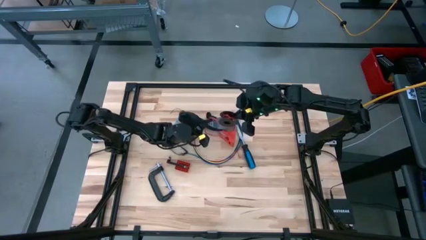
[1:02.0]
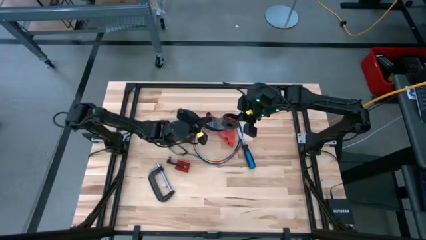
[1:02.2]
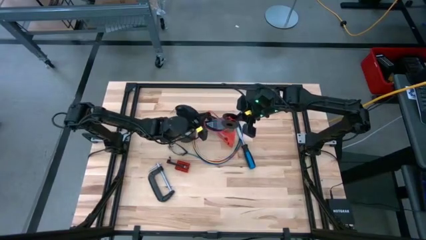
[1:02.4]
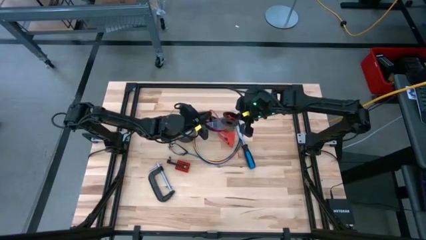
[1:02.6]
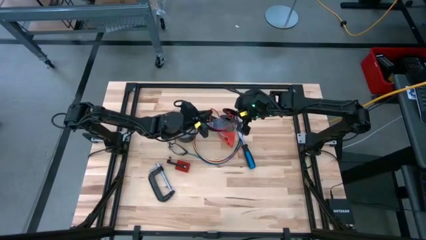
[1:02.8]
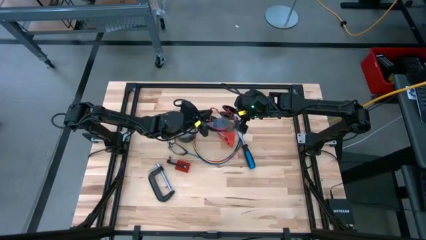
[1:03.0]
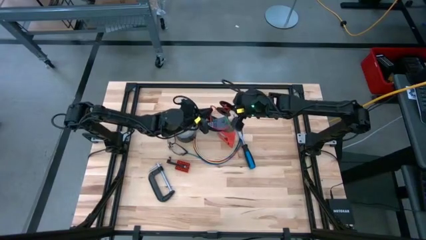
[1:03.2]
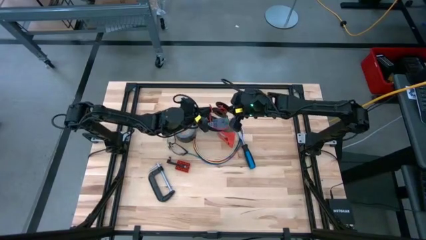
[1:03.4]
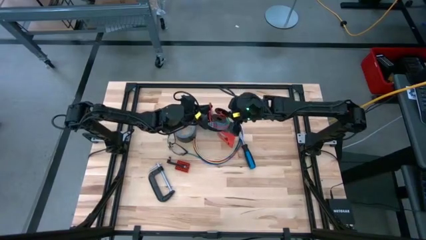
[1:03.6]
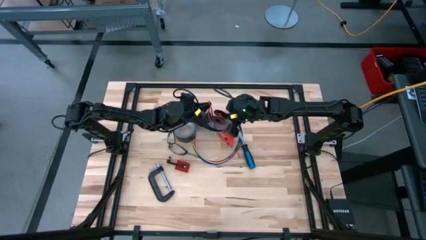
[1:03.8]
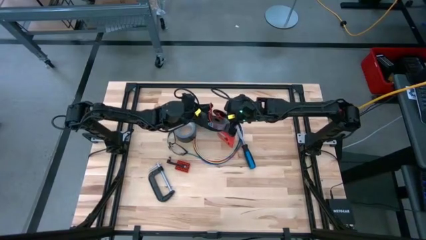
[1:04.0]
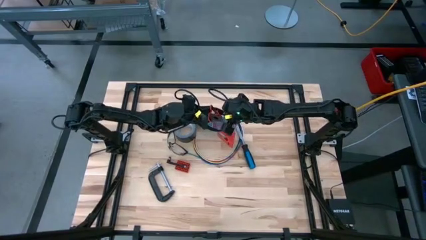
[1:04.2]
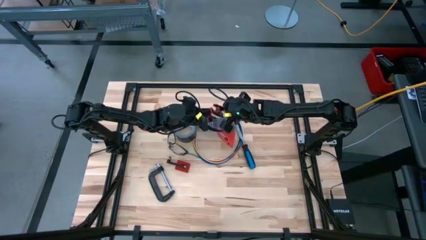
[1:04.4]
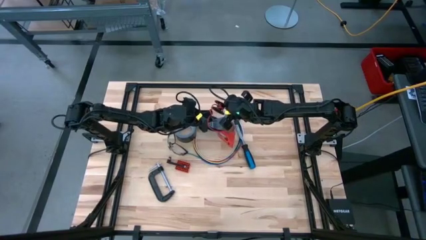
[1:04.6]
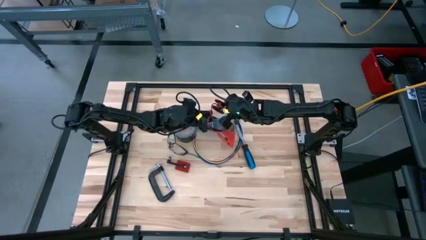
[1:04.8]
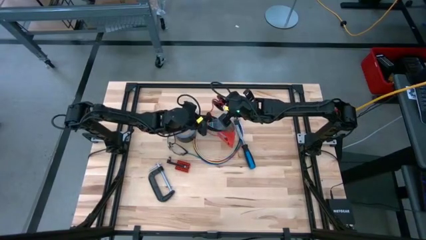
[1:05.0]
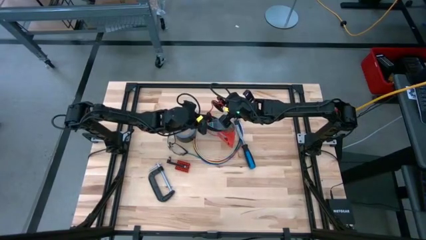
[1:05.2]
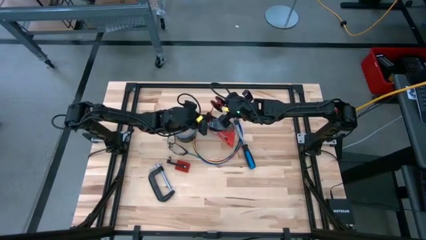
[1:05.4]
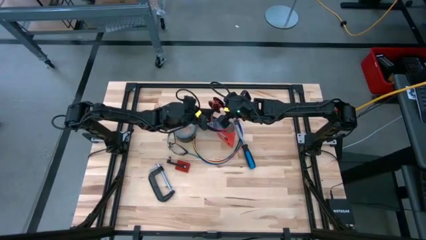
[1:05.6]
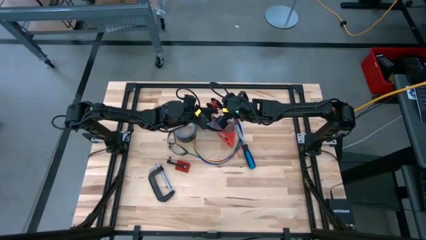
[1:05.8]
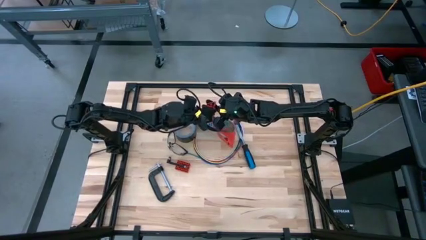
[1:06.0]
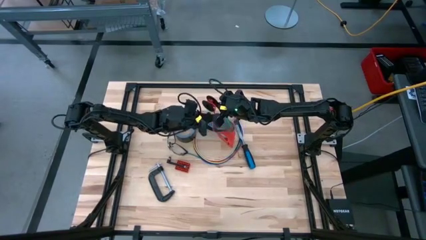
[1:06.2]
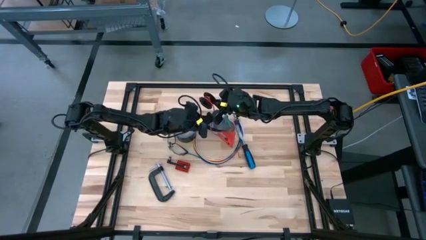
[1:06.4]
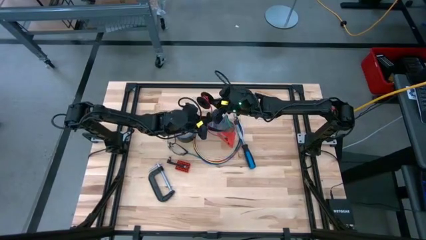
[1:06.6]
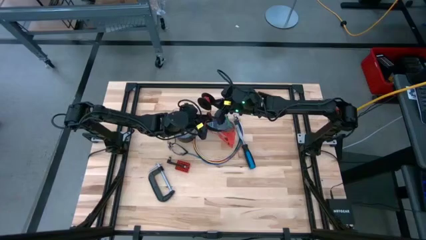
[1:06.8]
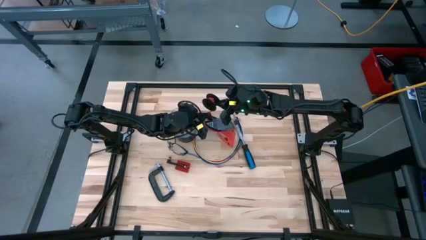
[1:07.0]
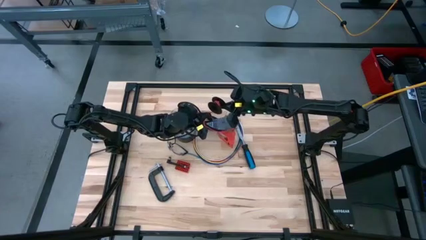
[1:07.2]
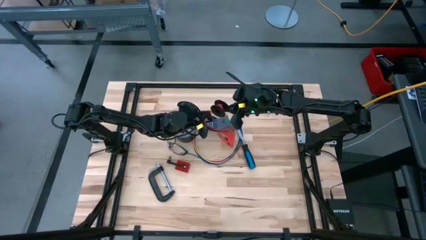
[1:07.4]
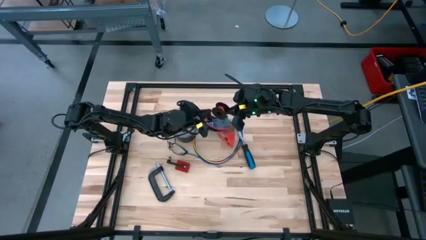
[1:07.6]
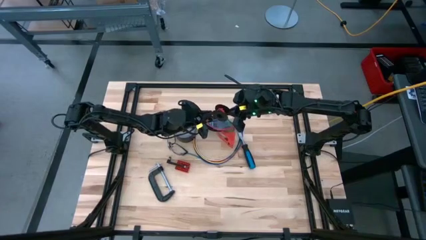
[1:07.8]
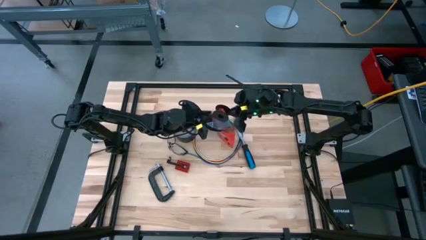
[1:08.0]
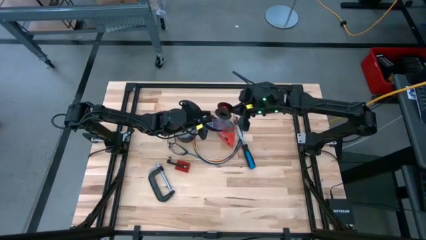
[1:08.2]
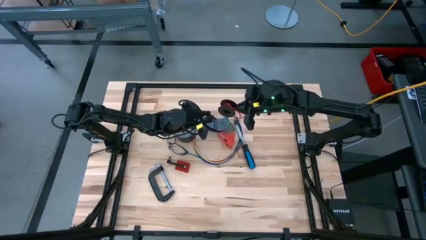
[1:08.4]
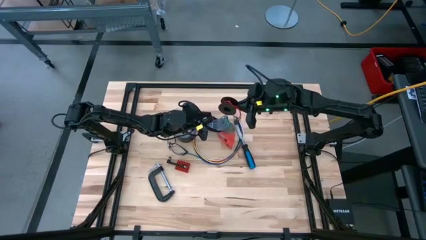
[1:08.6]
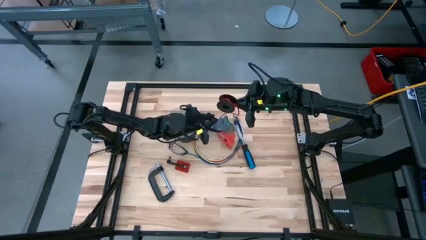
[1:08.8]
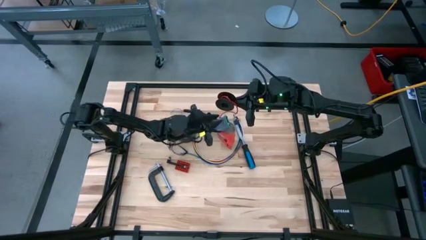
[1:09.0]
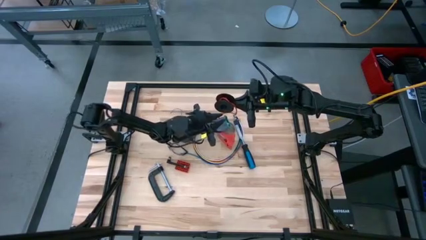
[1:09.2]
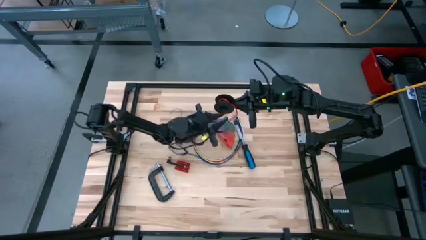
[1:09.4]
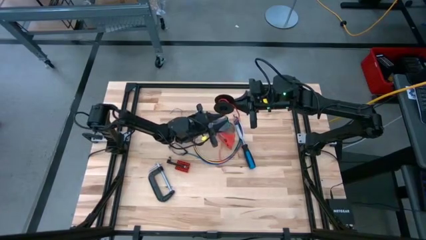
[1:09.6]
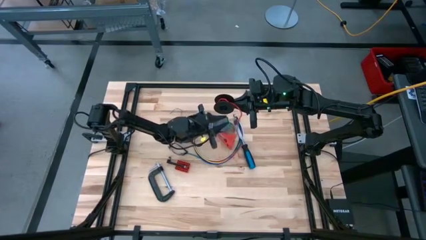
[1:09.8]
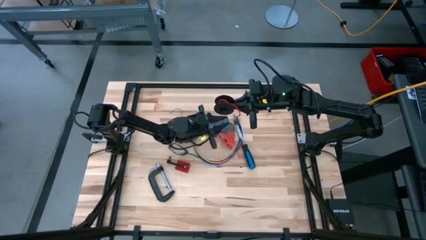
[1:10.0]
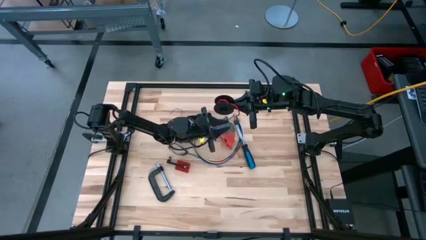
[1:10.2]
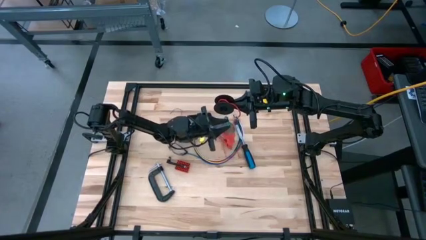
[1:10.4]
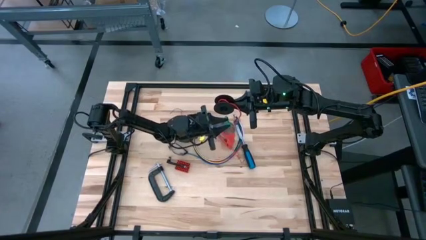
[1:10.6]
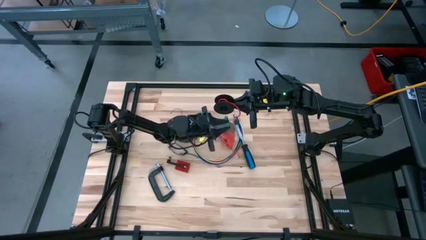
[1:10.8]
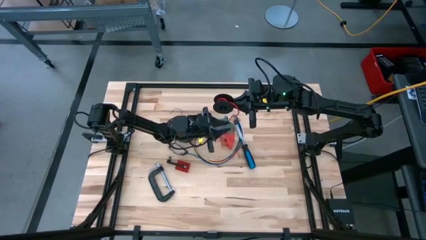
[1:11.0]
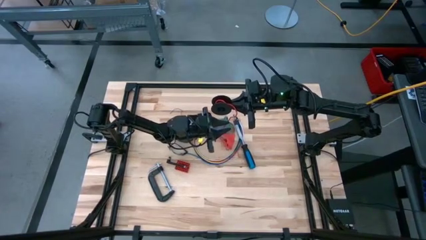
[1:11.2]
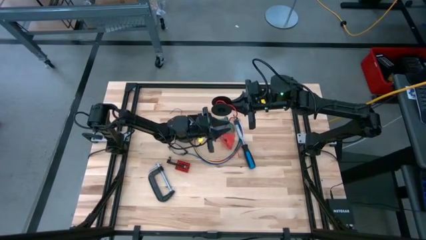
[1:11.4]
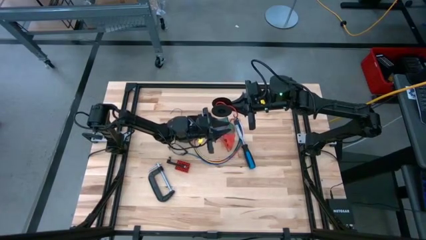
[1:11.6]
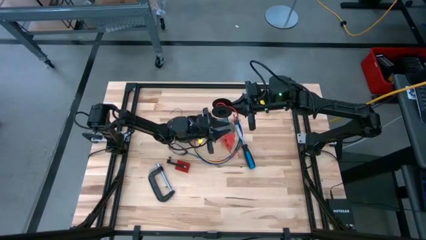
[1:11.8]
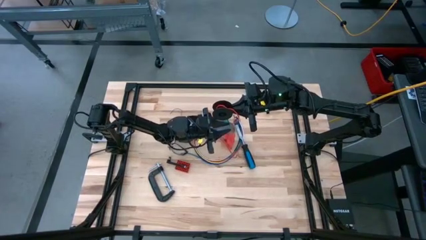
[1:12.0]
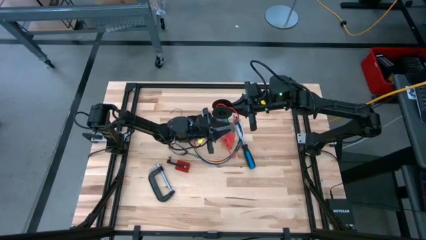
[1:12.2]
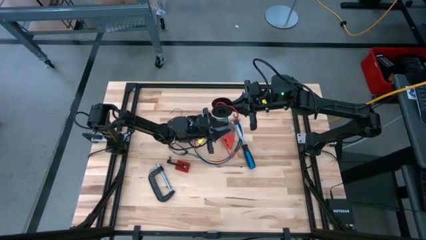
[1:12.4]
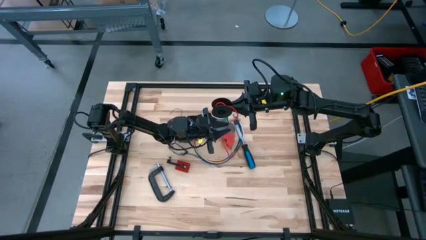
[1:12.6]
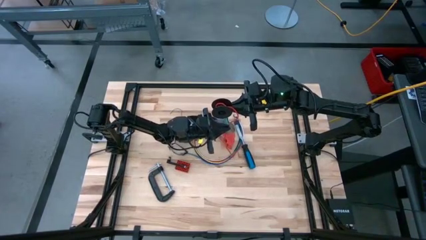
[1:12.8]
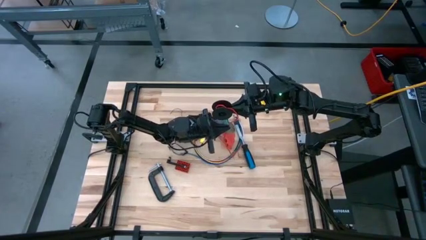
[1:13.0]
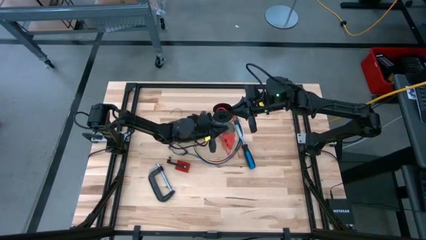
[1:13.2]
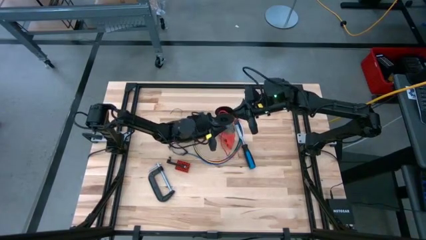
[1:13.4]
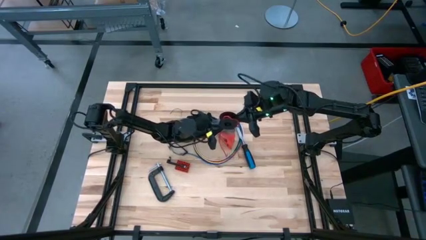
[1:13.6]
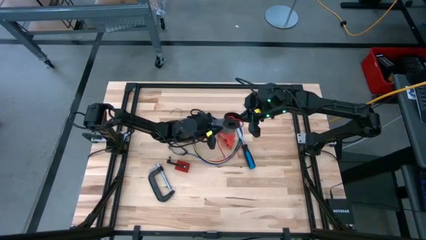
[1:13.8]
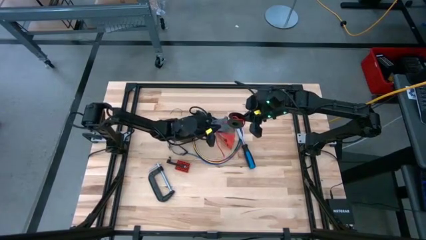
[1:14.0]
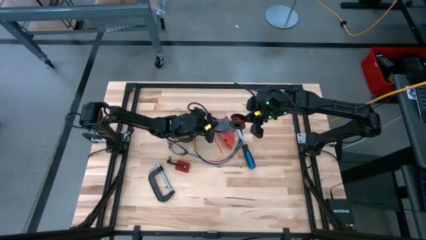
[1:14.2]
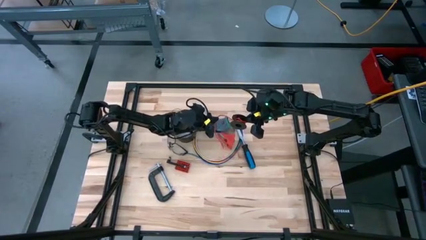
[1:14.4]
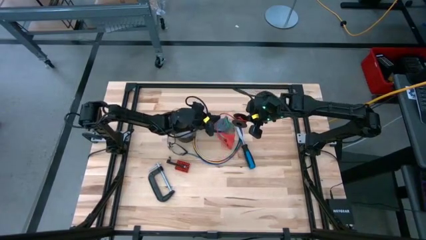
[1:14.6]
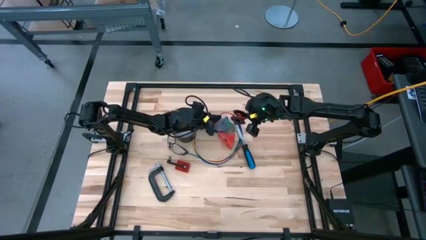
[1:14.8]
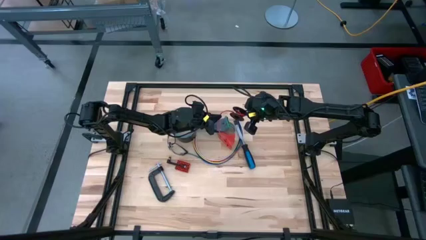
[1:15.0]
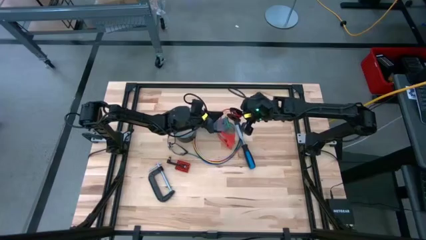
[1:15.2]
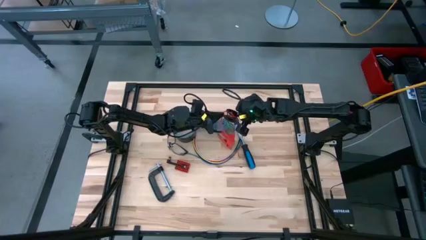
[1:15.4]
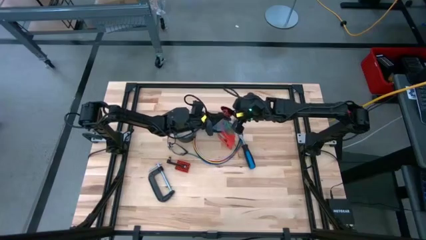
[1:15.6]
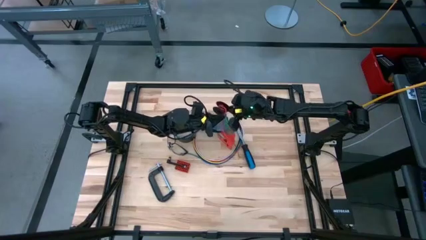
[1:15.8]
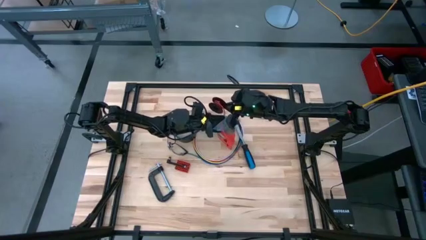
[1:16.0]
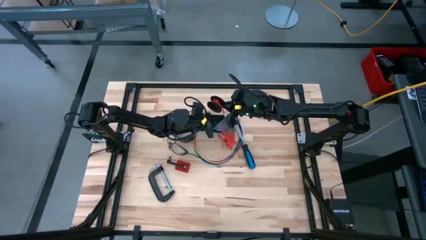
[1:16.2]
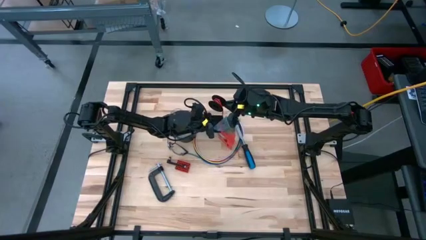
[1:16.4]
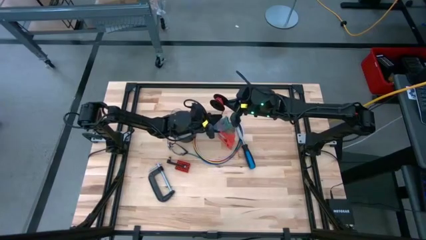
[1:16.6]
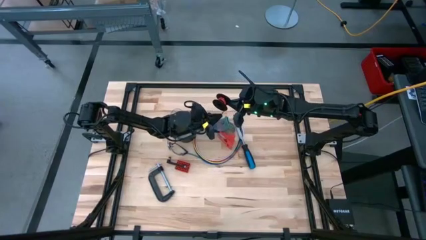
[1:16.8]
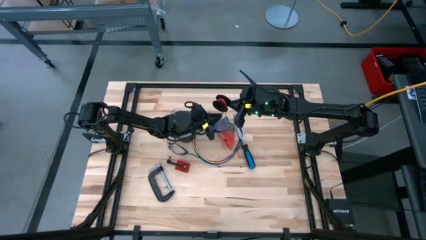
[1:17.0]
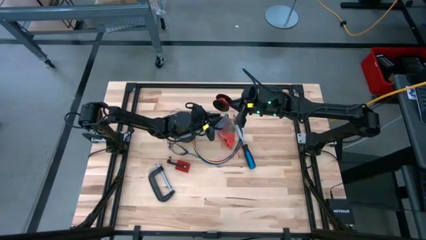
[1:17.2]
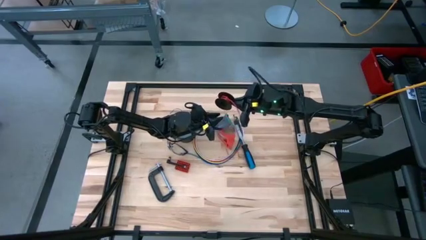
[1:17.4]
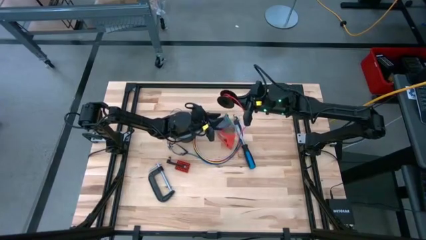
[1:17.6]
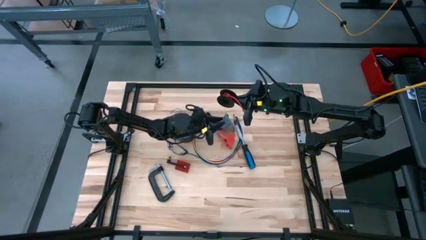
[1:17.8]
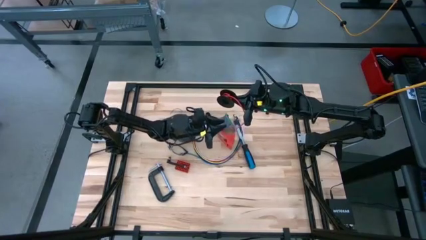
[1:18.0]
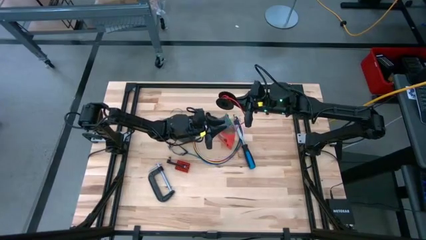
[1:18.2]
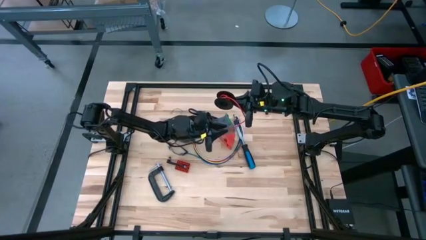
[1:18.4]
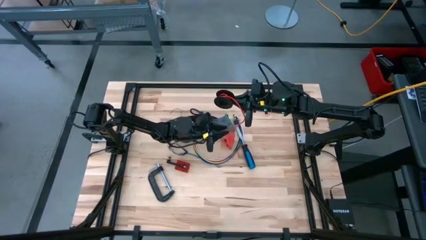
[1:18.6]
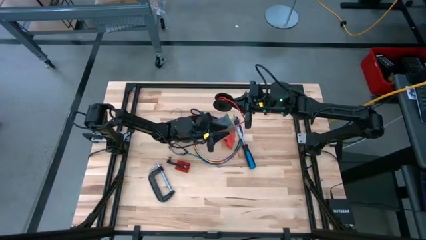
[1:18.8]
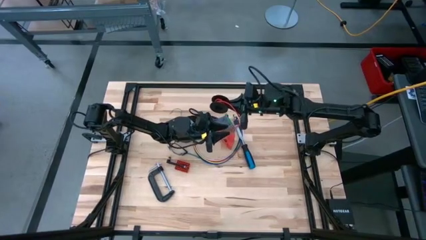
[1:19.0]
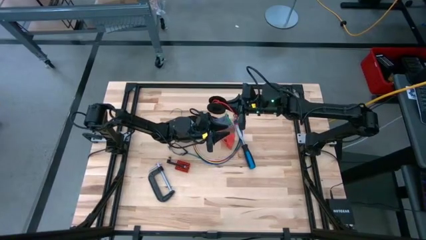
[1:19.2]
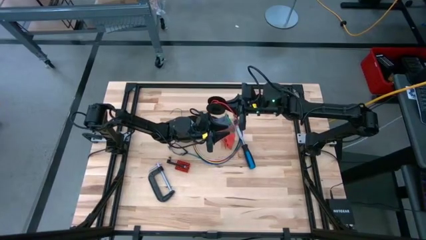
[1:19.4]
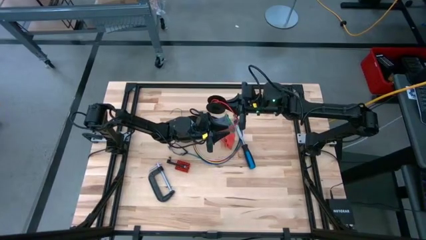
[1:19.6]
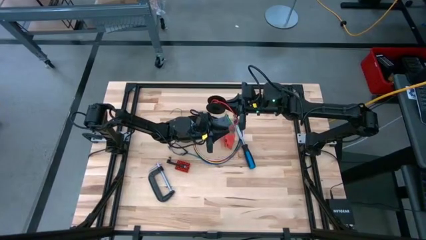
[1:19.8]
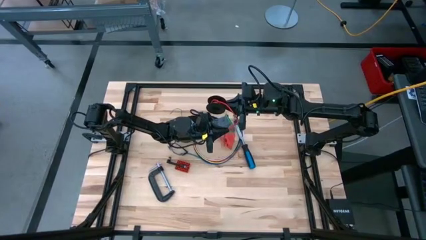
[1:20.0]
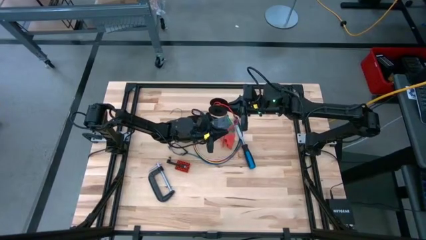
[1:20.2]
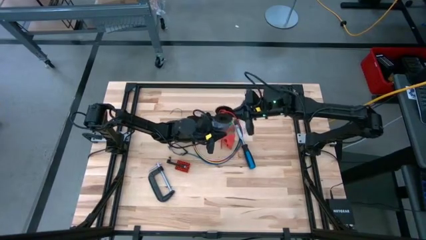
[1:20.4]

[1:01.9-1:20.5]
Task: Coil cords
Coil the red wire cable onto the black spool
